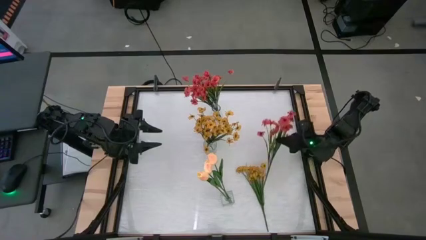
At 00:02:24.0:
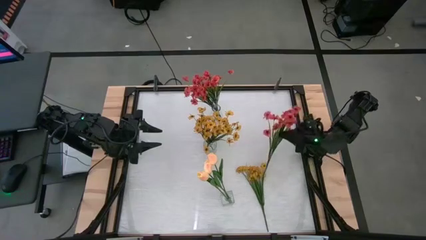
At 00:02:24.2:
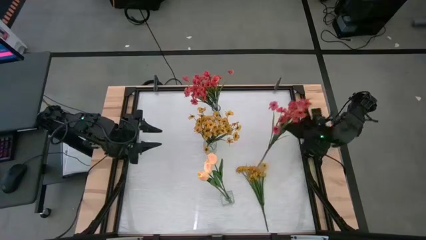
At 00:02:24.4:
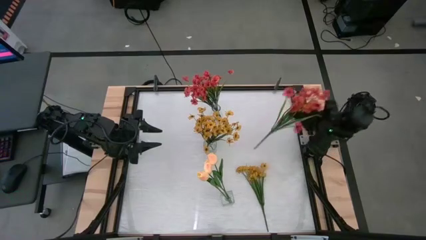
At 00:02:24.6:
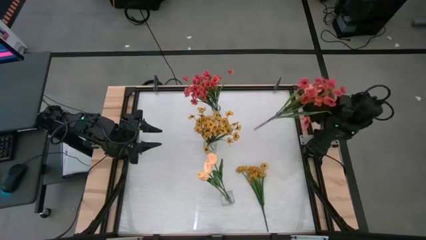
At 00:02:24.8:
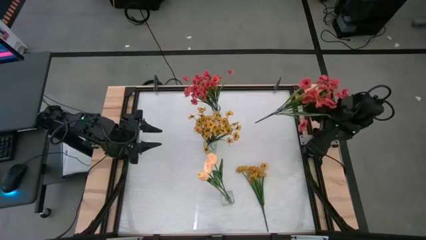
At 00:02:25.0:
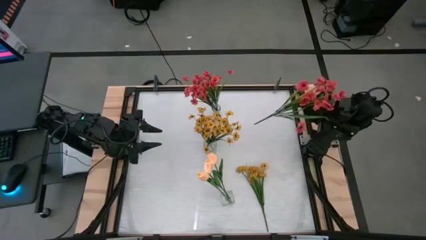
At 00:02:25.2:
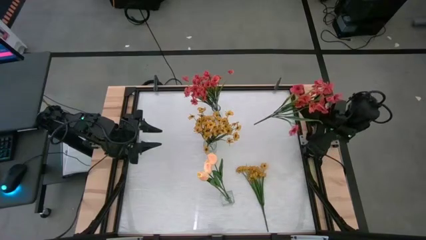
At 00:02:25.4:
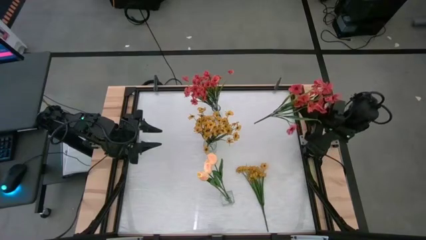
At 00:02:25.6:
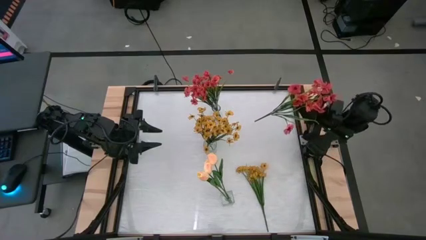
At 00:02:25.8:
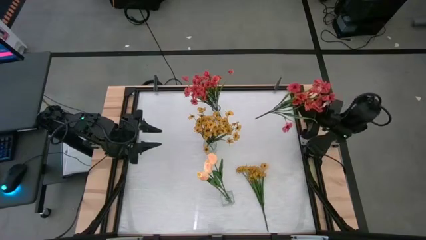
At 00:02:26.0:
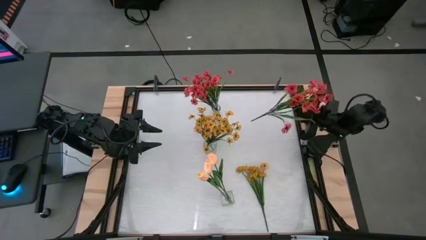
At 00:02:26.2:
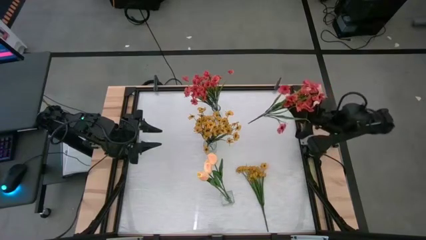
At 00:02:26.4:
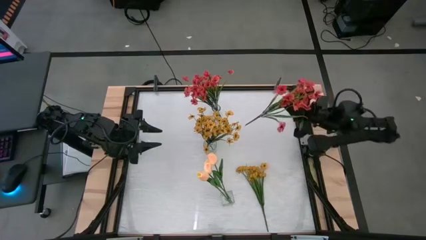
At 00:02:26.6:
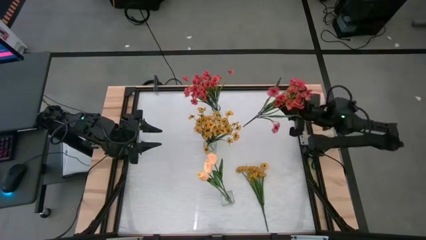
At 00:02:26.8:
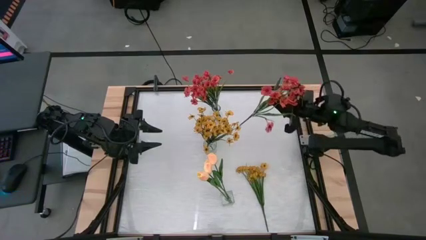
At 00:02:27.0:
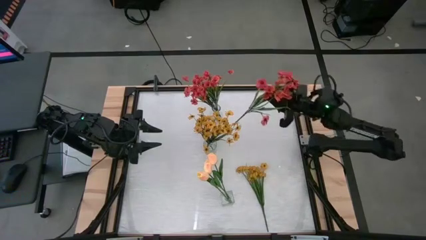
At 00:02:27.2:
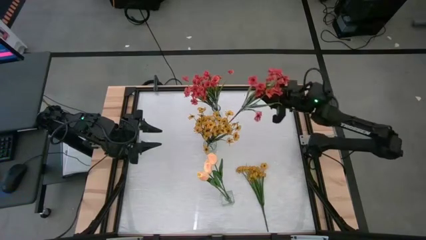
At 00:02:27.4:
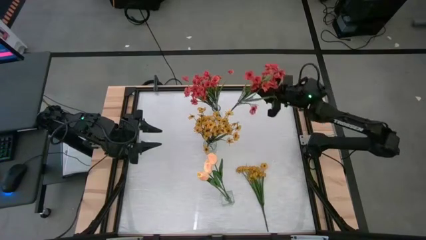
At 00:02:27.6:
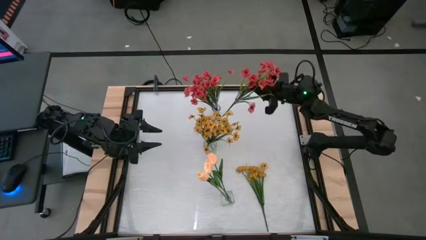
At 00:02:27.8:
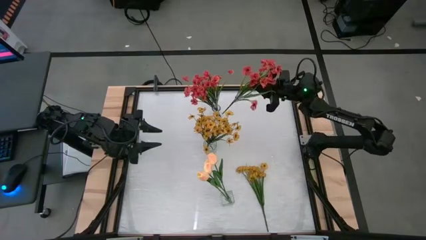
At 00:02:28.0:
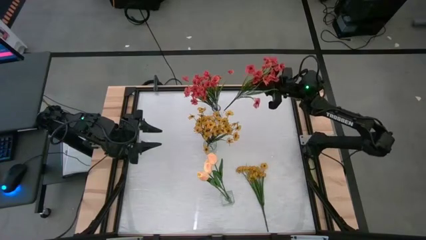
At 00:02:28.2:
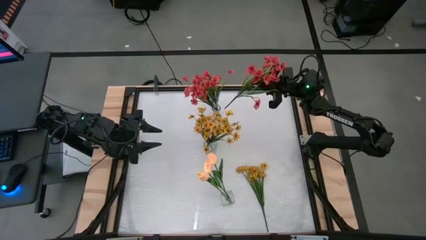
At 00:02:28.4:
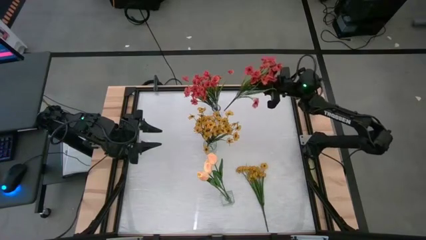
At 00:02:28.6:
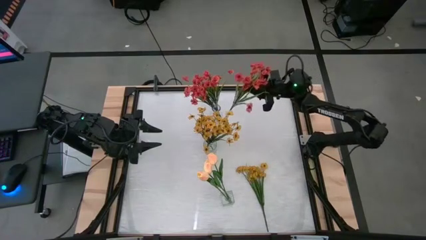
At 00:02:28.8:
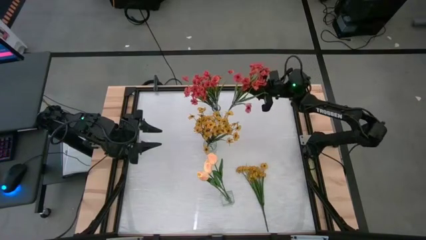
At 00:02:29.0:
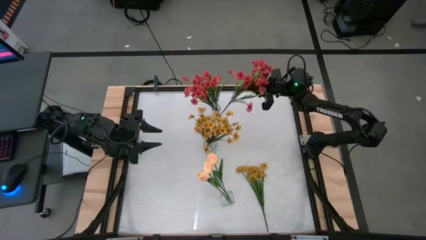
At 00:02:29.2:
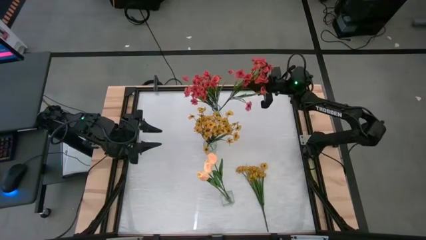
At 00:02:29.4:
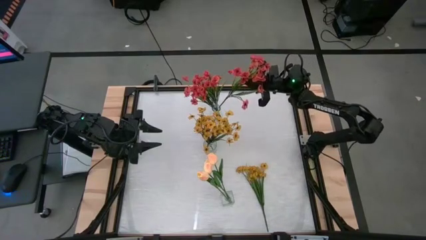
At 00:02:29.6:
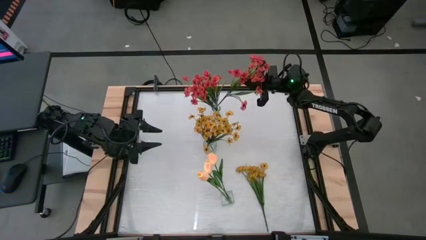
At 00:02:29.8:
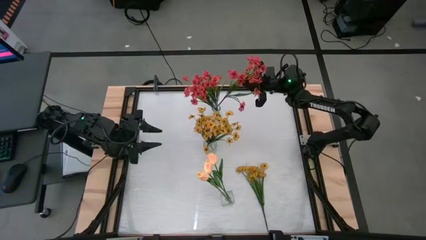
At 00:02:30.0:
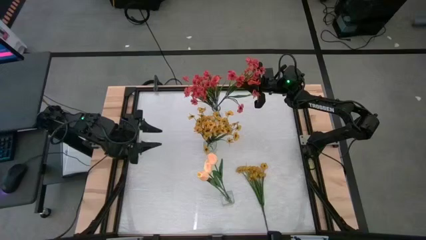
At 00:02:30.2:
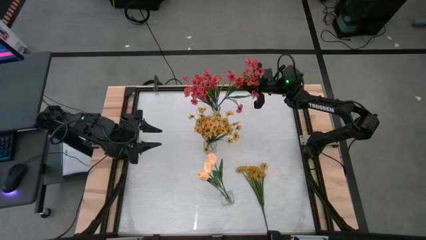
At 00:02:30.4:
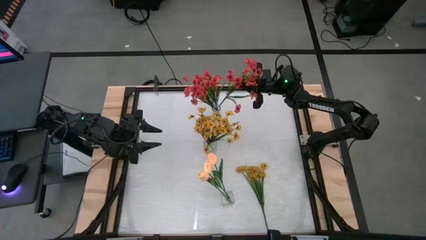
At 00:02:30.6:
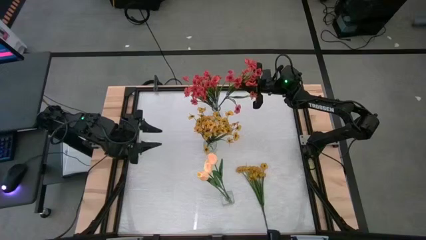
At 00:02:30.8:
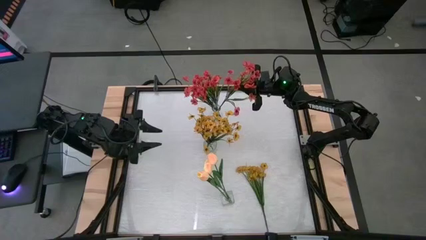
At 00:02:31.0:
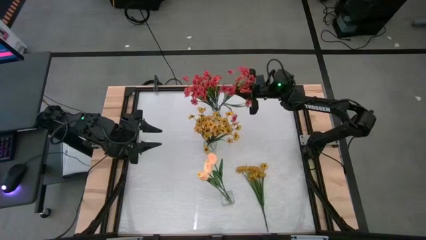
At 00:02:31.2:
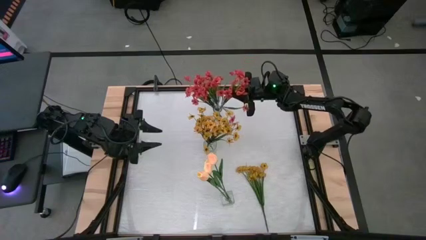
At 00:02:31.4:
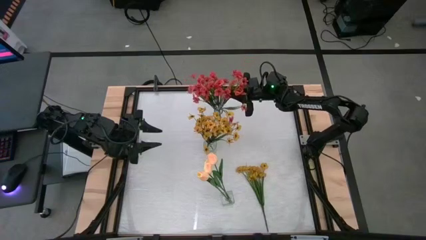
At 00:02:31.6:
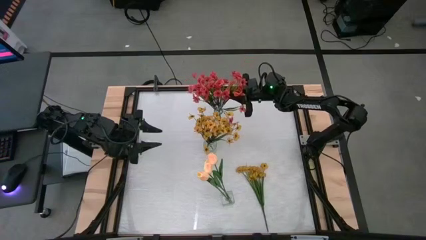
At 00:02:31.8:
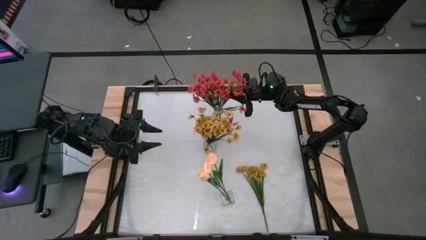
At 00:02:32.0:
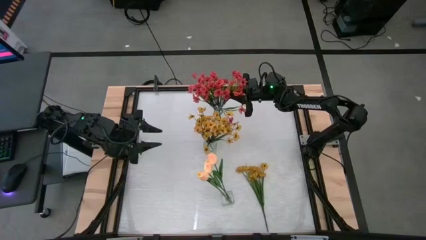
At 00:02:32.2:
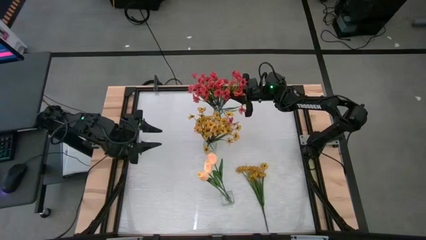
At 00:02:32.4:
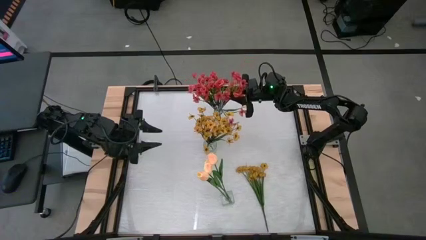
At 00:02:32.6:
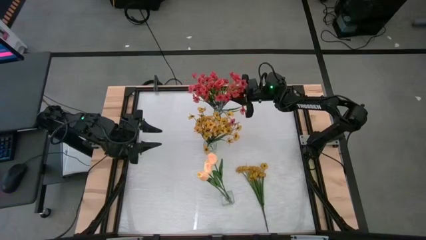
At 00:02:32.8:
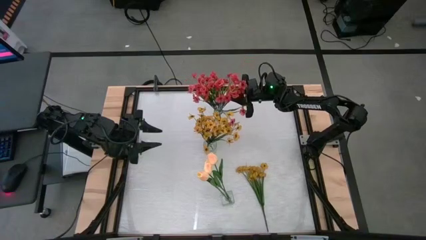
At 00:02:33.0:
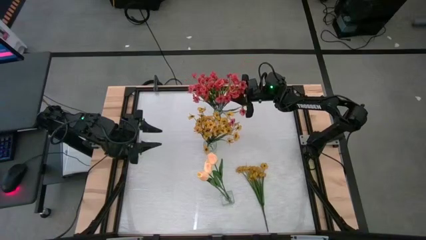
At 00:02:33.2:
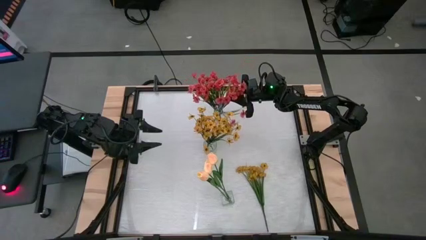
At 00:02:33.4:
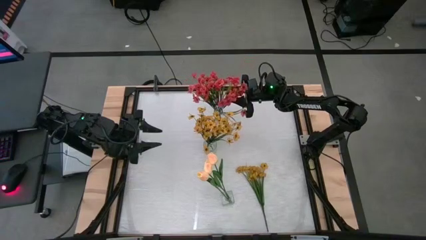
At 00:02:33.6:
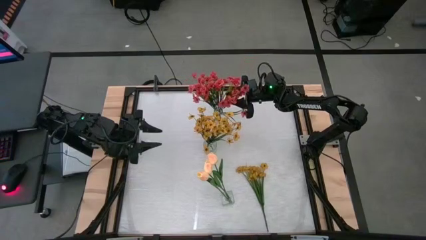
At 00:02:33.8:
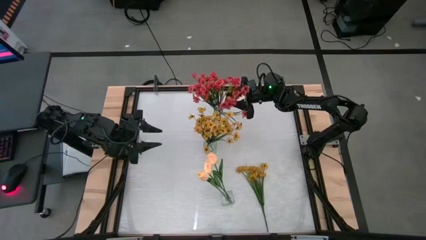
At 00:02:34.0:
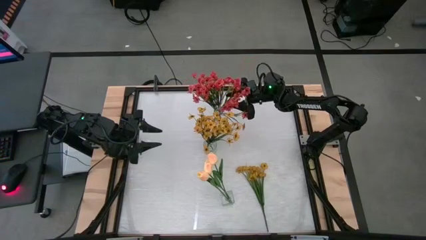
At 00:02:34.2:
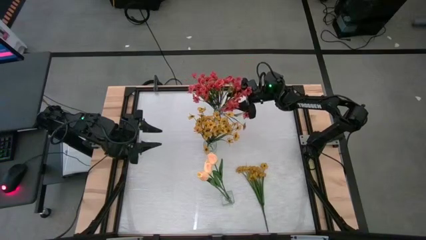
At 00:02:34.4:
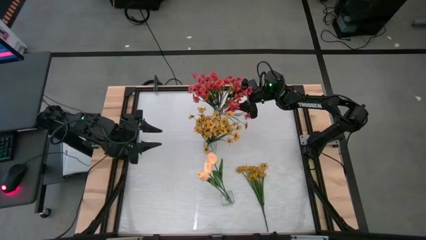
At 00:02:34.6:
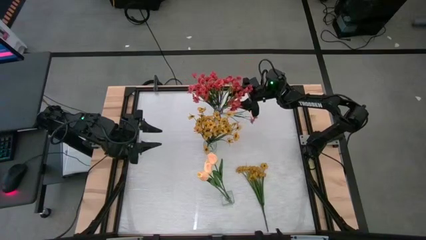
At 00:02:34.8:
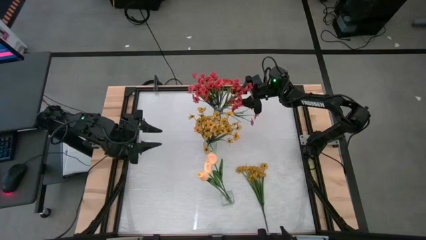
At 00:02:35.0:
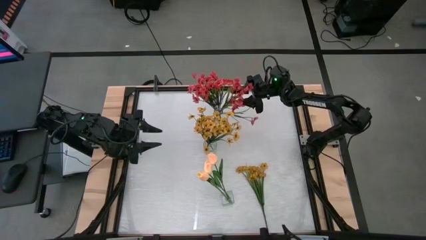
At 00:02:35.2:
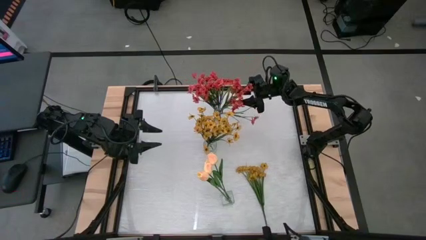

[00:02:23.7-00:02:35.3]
Task: Sort flowers into vase by color
Put the red flowers into the top transparent vase

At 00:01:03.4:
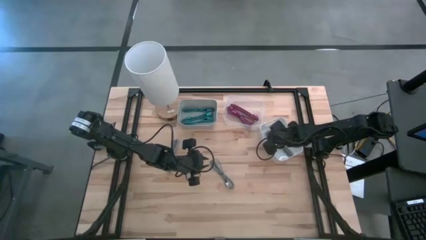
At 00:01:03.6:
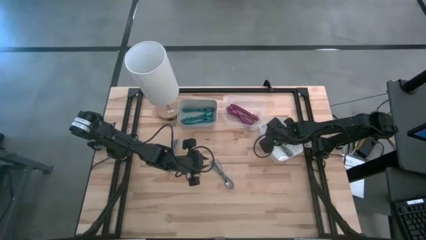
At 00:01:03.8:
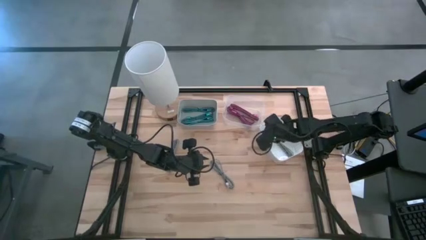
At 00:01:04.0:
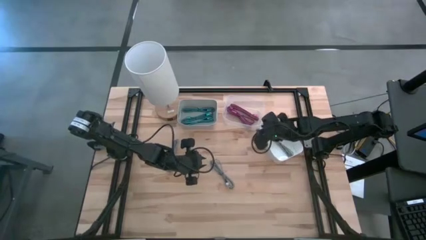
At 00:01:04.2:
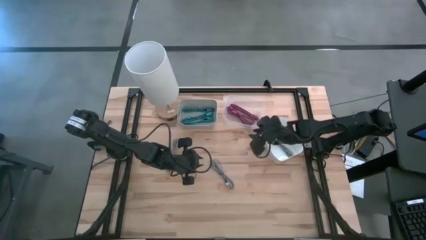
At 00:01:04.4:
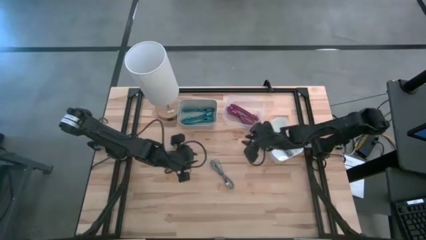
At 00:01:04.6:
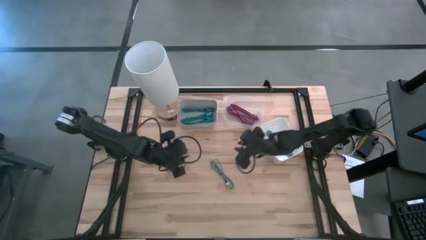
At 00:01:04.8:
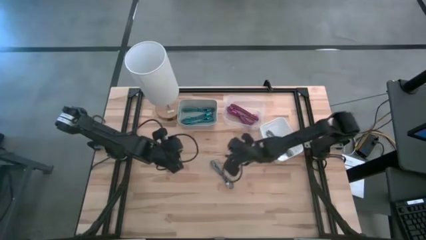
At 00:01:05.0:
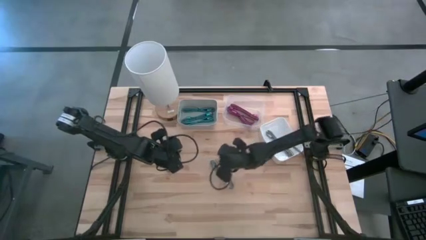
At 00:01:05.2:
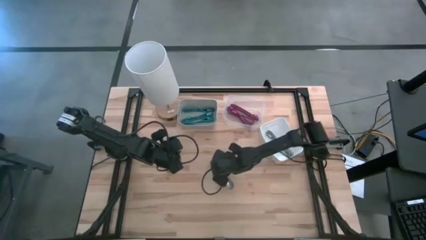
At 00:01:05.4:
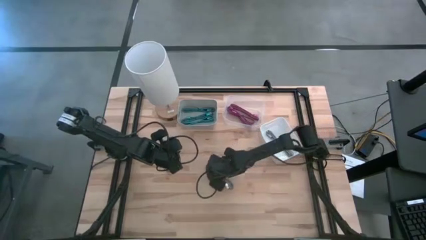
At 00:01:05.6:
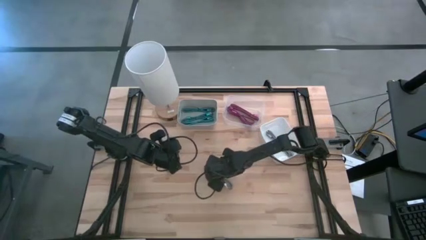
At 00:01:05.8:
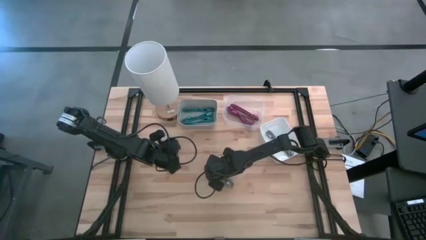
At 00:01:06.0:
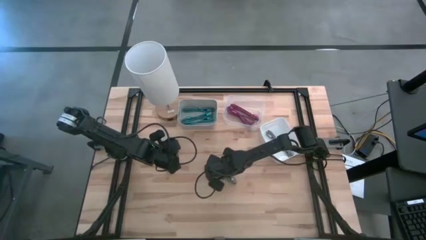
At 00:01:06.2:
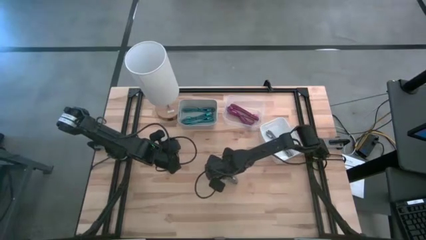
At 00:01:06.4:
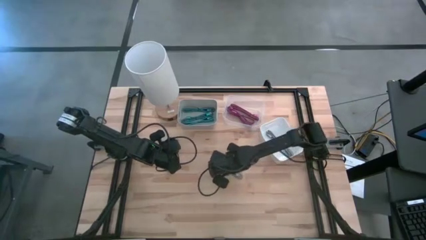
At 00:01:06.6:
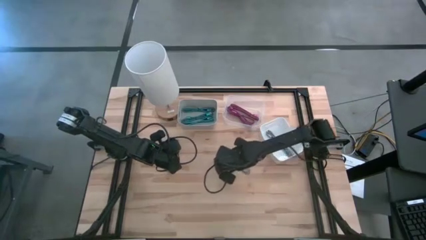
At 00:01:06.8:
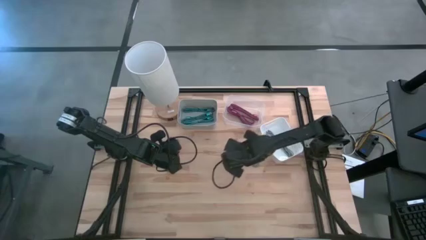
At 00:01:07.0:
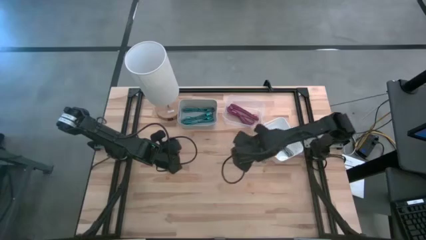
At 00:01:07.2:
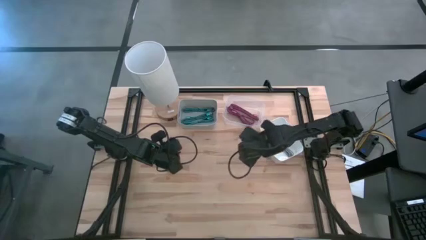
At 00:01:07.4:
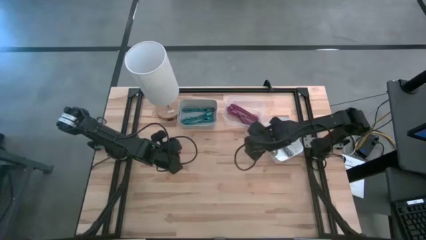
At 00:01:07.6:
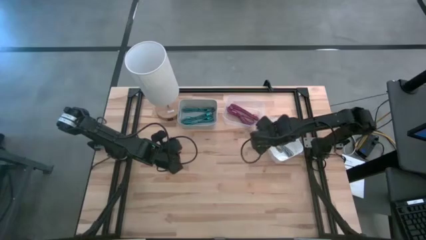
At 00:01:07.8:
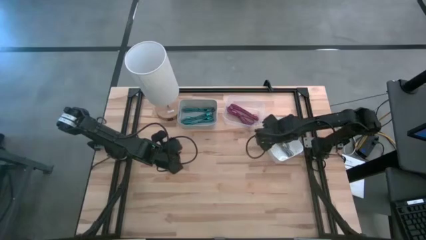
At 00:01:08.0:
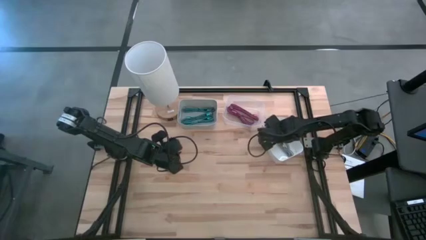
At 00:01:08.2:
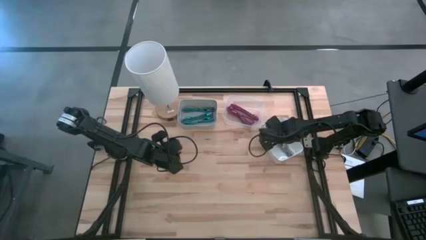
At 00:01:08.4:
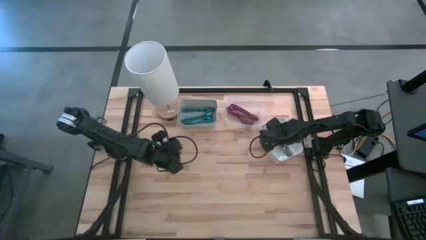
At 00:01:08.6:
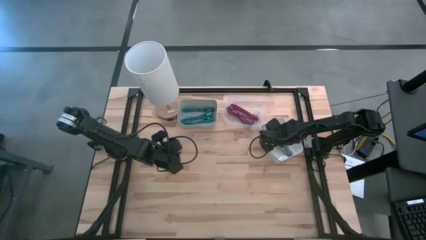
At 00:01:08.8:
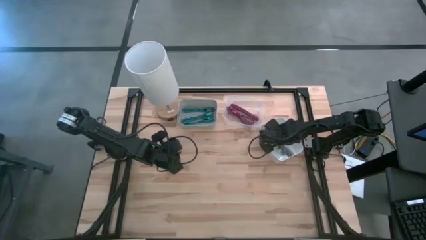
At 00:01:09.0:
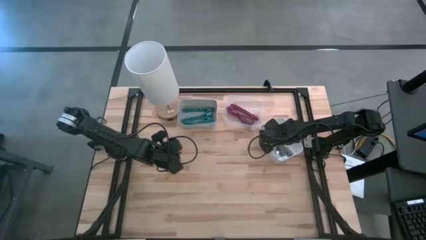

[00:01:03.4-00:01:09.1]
Task: Pick & Place USB Port
Put the right black and white USB cable into the white bin
